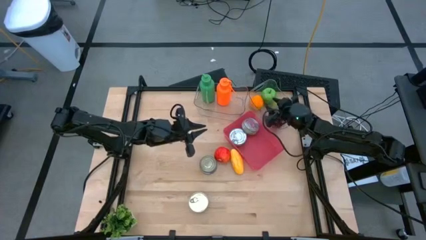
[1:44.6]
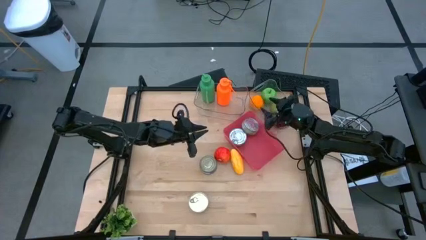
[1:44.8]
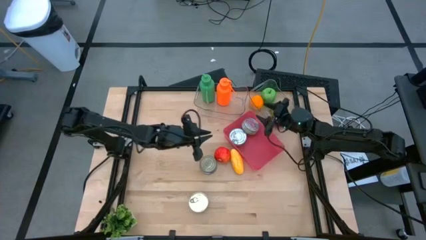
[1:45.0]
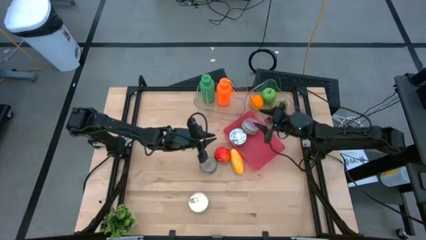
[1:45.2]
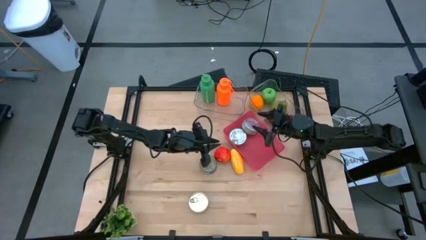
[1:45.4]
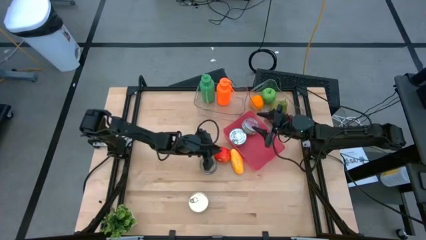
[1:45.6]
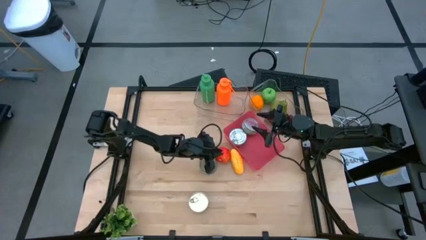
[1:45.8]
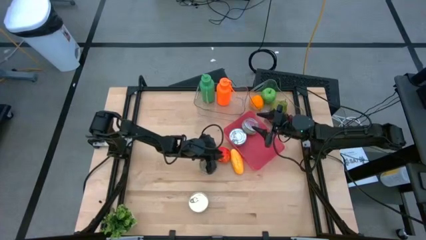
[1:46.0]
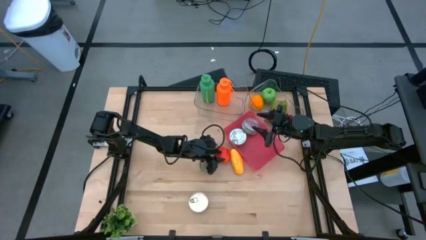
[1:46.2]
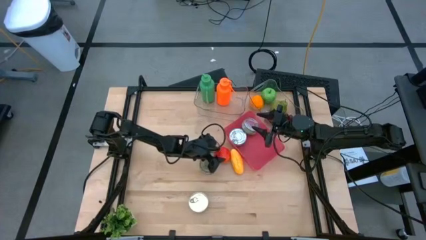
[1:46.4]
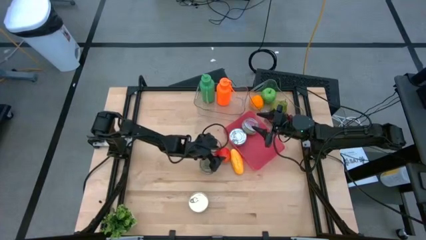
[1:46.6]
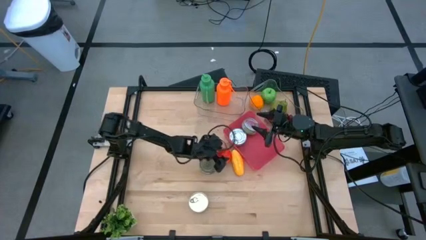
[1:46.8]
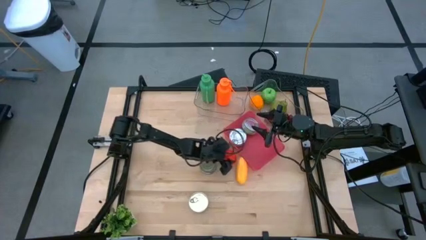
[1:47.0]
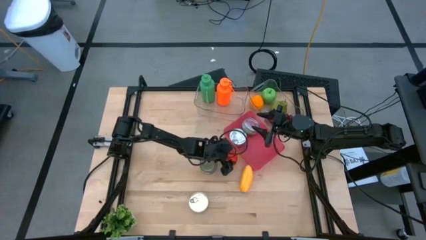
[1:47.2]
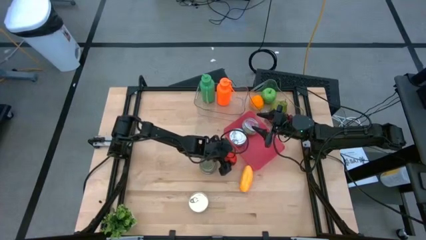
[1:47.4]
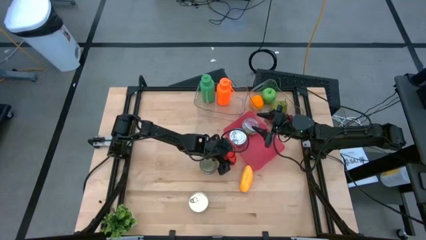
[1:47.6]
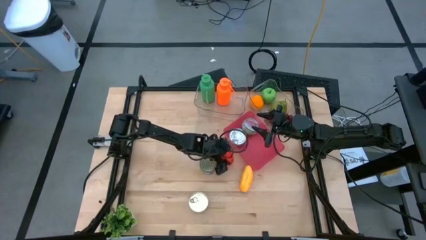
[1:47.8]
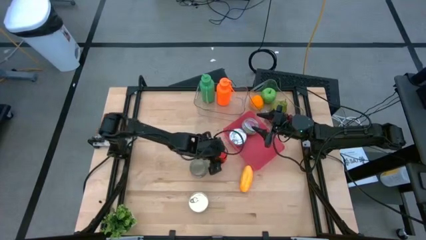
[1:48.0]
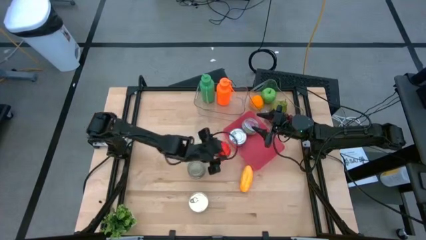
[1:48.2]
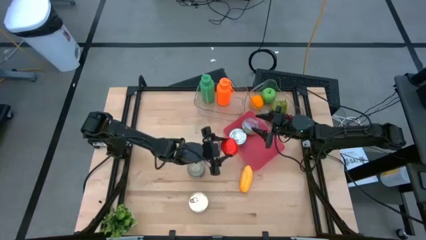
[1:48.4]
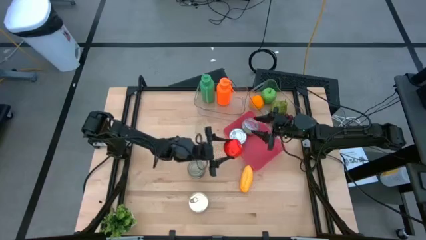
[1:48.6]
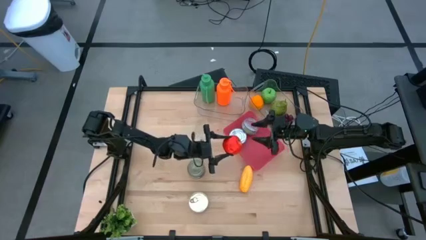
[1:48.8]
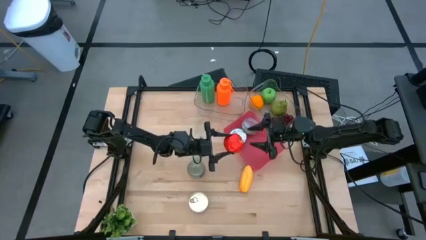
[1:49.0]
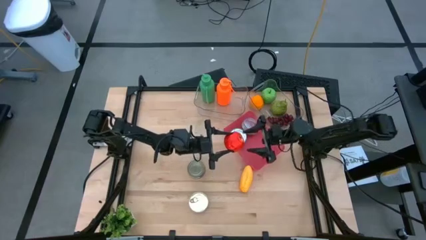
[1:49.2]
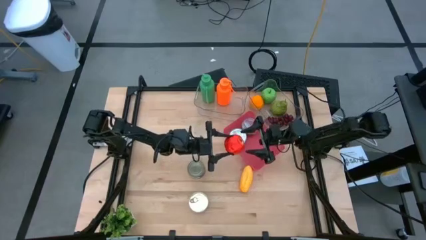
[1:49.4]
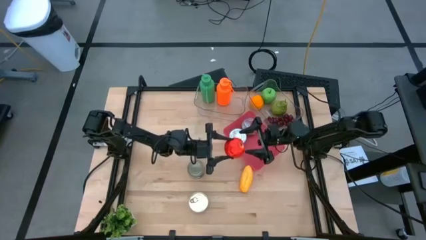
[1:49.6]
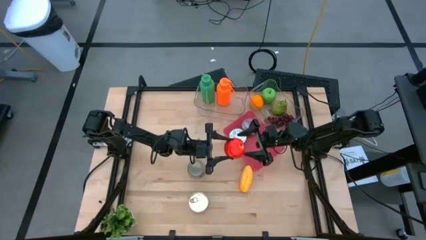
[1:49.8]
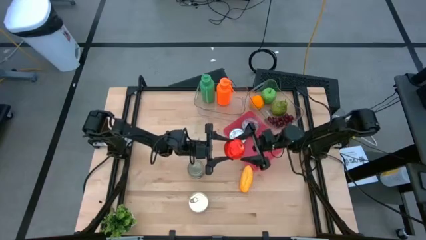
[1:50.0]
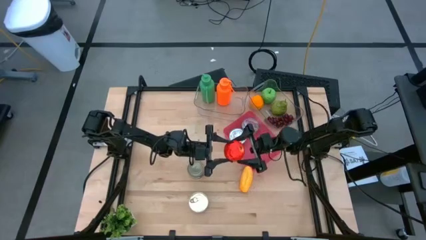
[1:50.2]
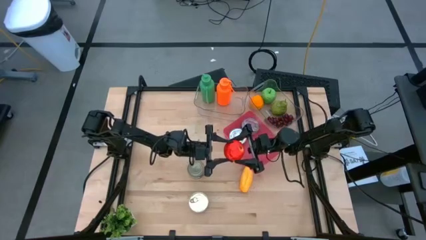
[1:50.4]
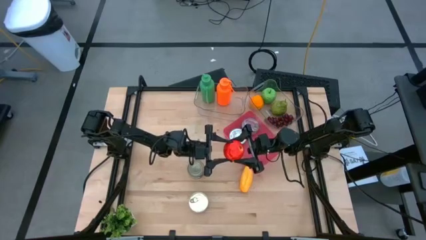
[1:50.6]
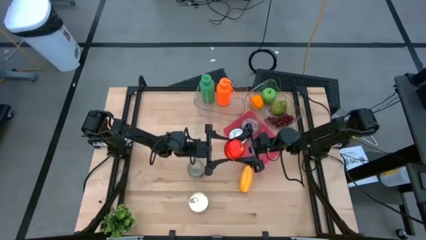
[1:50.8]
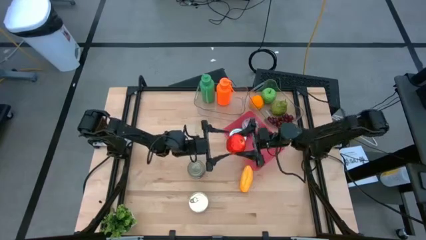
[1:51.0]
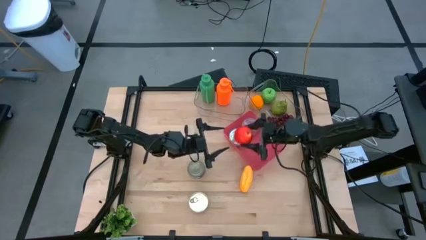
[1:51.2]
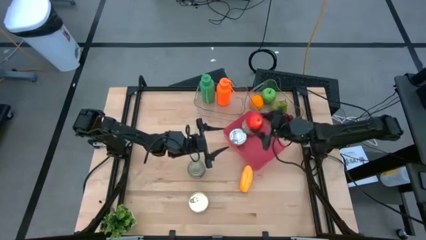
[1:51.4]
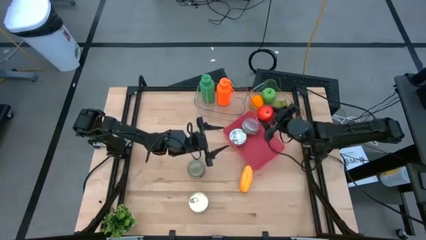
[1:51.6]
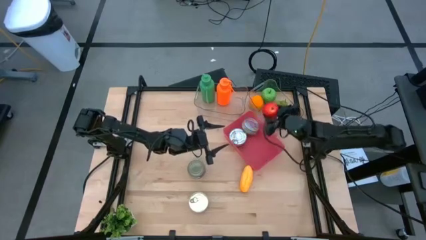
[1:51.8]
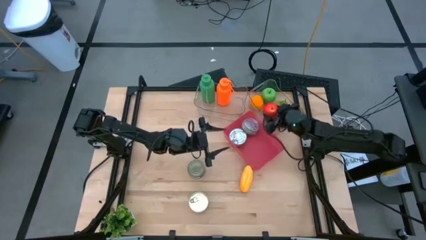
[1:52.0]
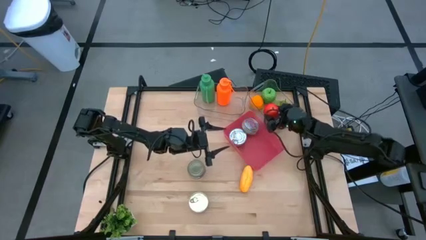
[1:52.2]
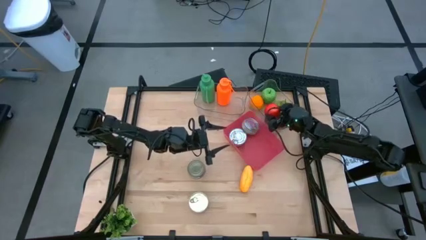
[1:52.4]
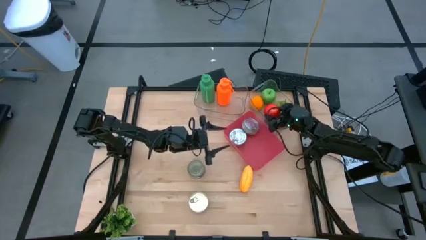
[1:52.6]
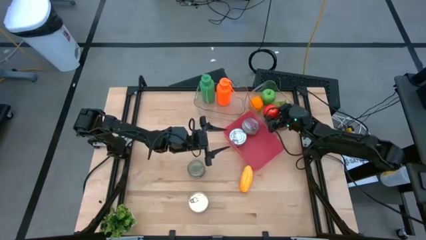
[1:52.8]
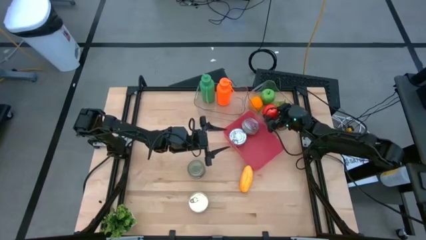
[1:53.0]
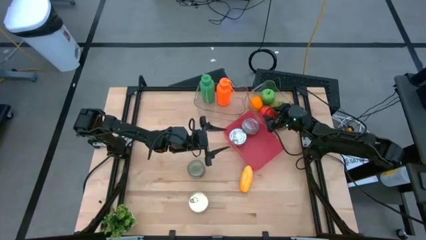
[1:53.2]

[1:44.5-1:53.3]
Task: Pick & Place Food Item
Put the red apple into the right transparent bin

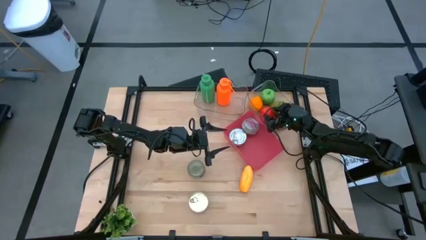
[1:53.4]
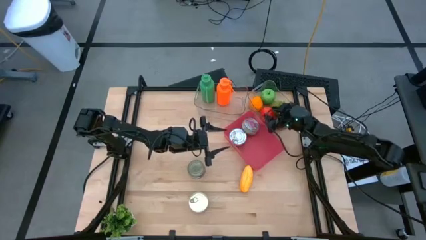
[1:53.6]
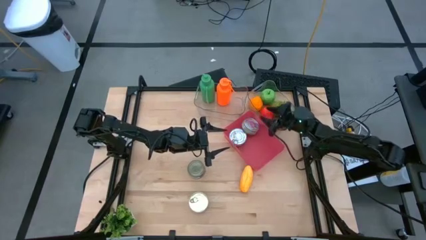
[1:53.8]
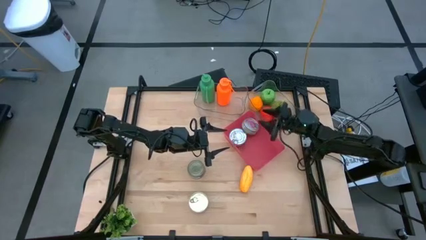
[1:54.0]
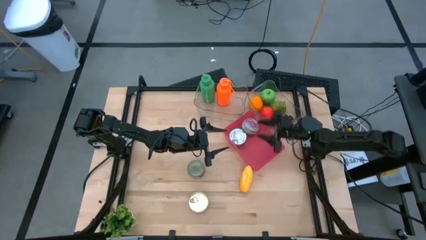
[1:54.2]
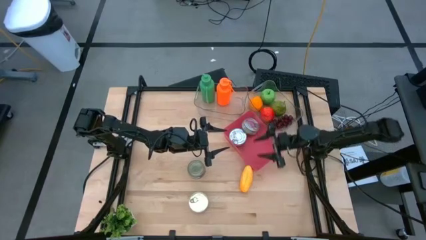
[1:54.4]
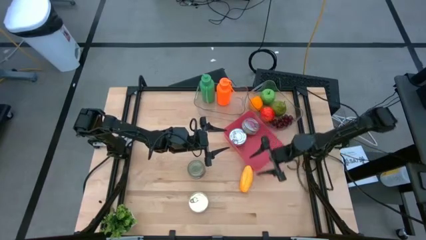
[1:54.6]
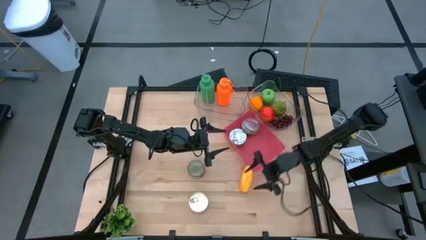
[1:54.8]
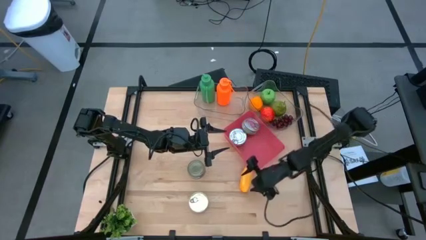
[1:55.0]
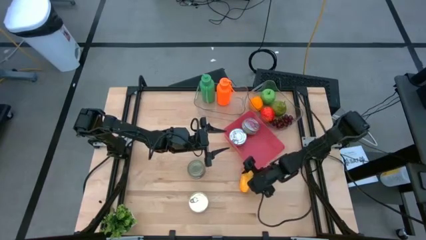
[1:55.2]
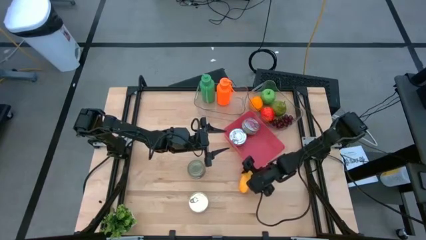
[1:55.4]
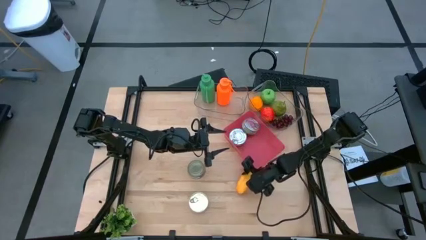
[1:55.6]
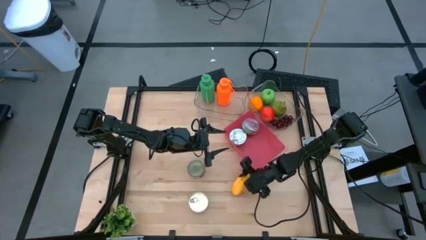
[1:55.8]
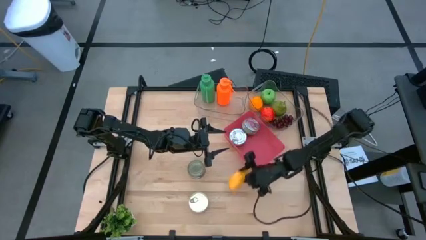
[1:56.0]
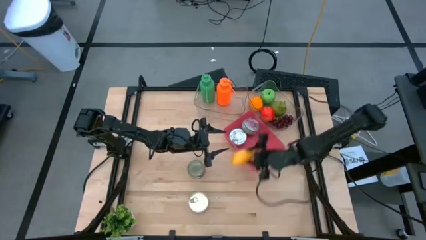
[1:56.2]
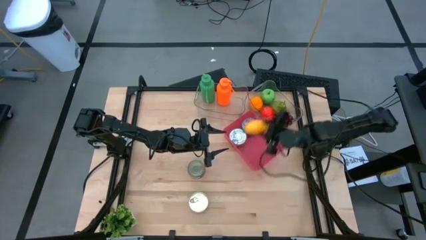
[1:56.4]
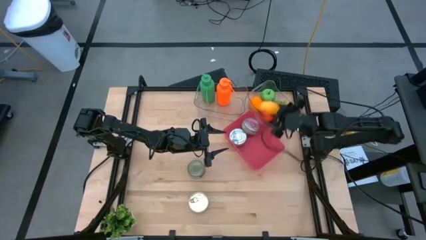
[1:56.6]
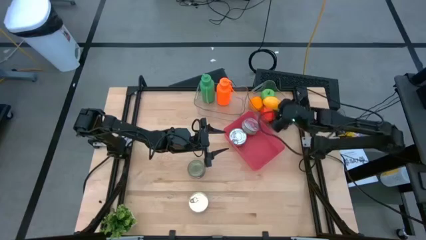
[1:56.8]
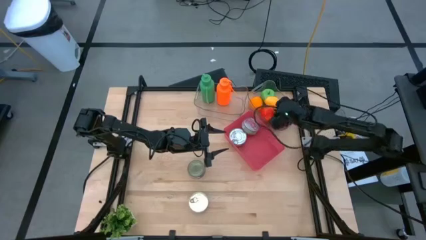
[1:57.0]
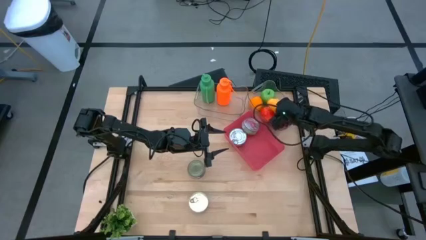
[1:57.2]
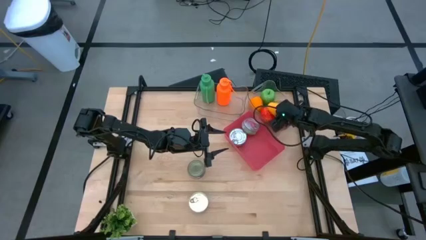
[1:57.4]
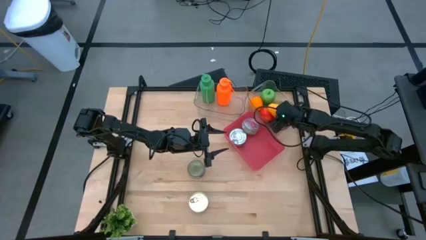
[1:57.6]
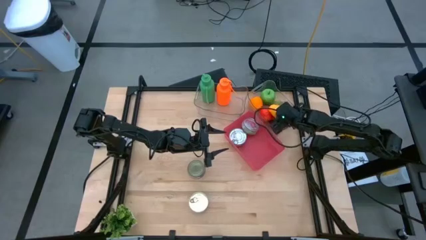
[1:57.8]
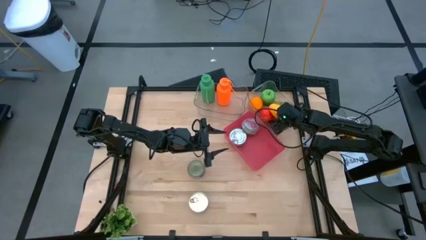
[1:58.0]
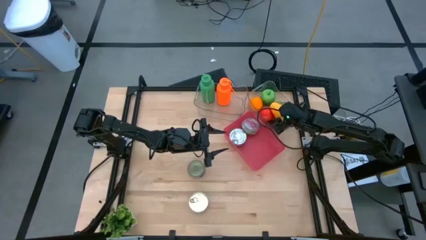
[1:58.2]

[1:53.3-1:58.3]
Put the yellow mango into the right transparent bin
